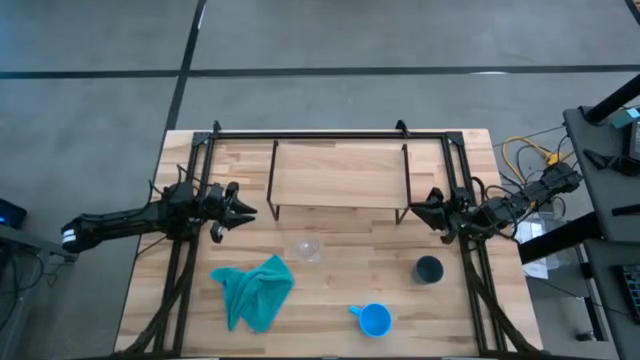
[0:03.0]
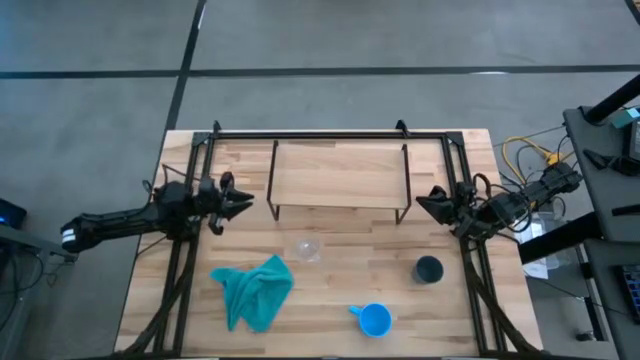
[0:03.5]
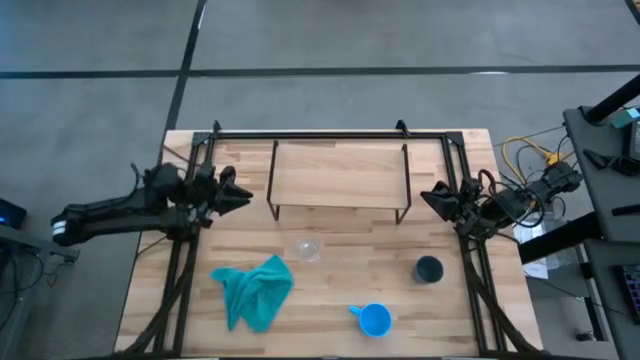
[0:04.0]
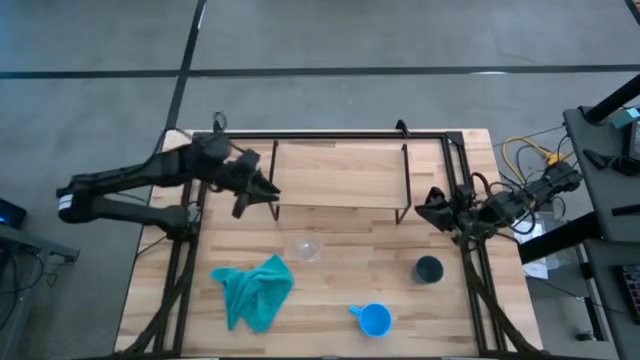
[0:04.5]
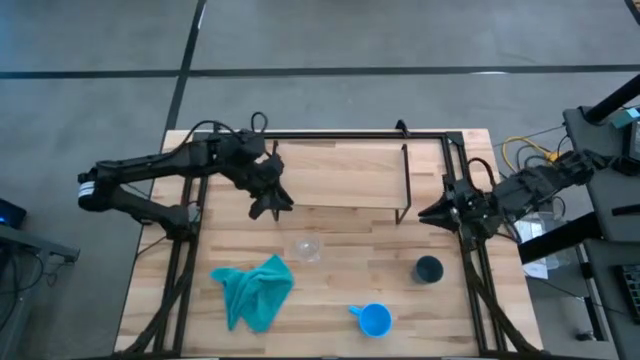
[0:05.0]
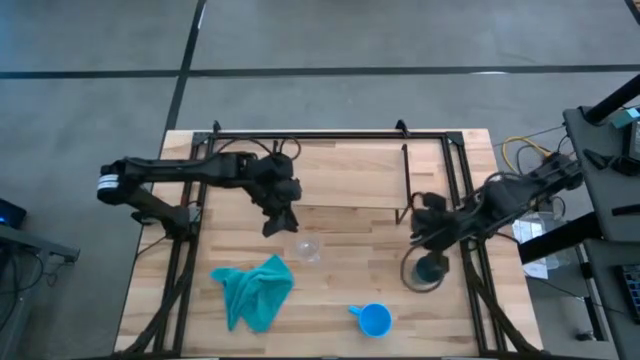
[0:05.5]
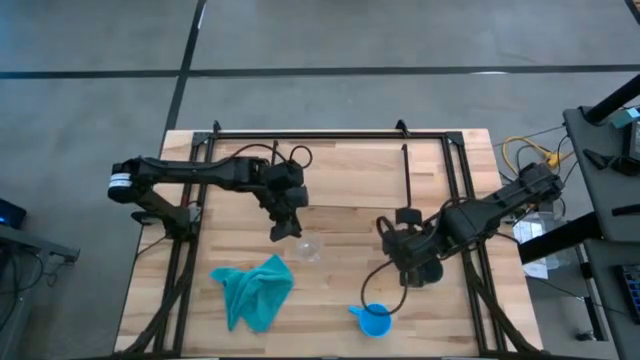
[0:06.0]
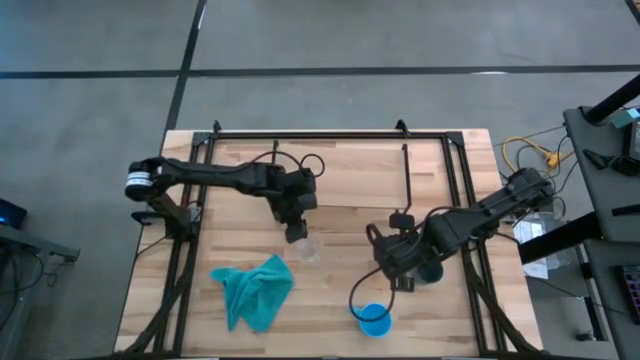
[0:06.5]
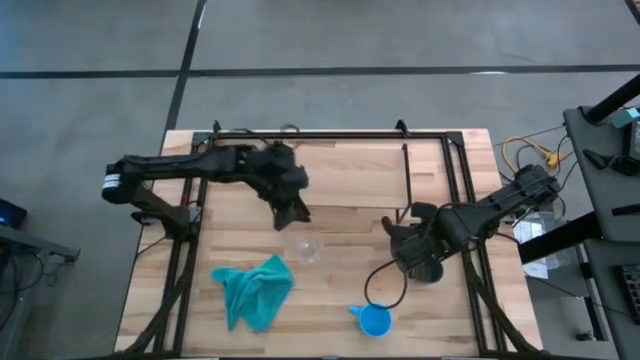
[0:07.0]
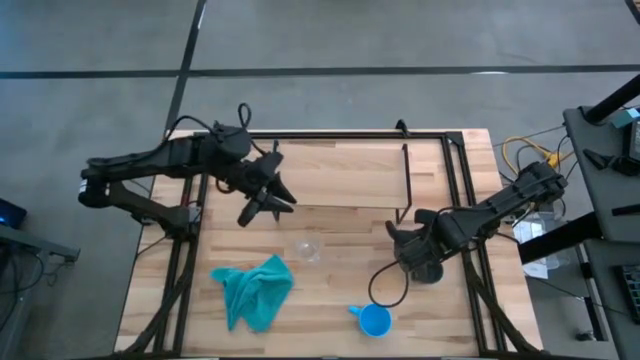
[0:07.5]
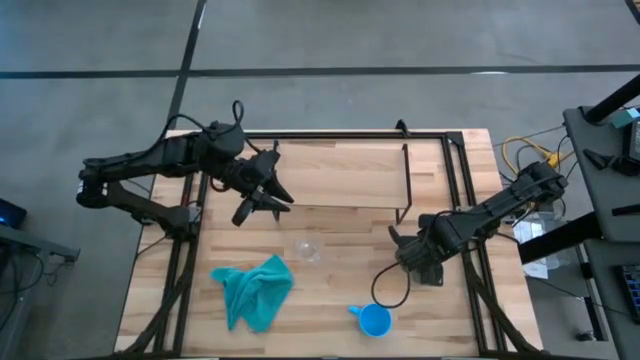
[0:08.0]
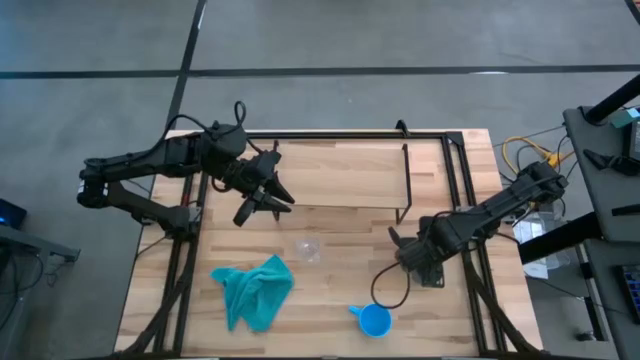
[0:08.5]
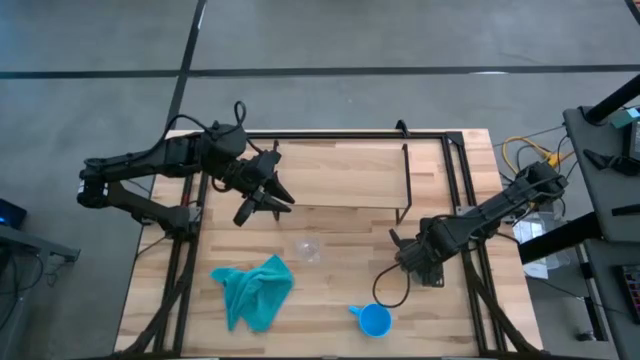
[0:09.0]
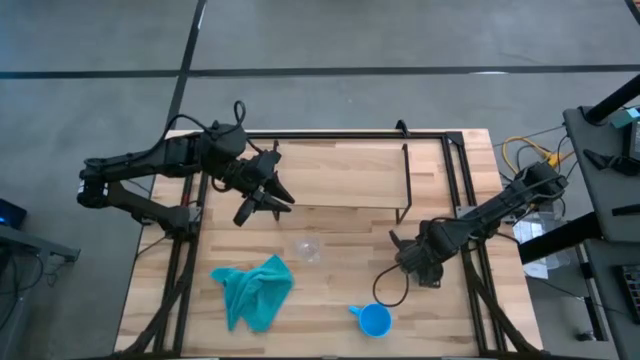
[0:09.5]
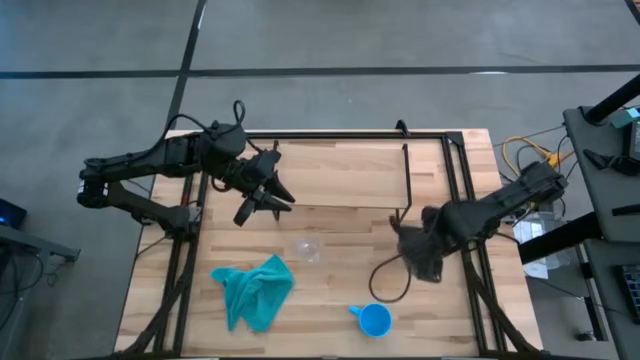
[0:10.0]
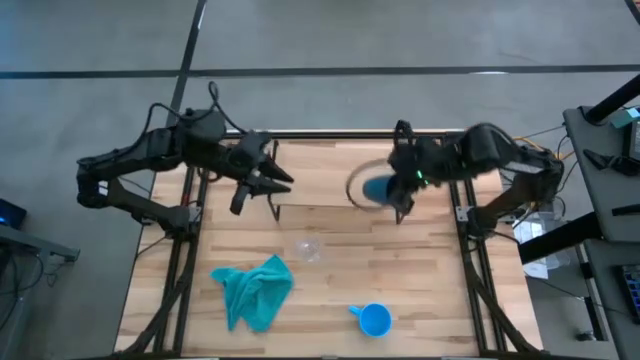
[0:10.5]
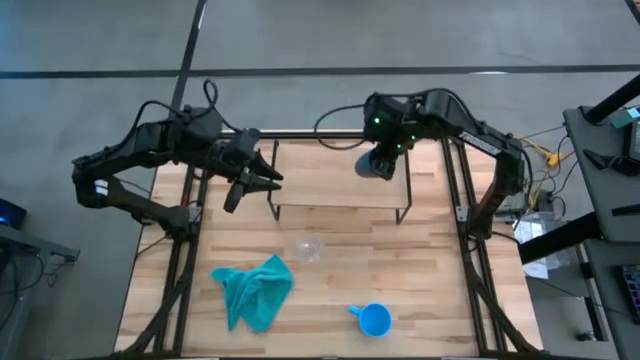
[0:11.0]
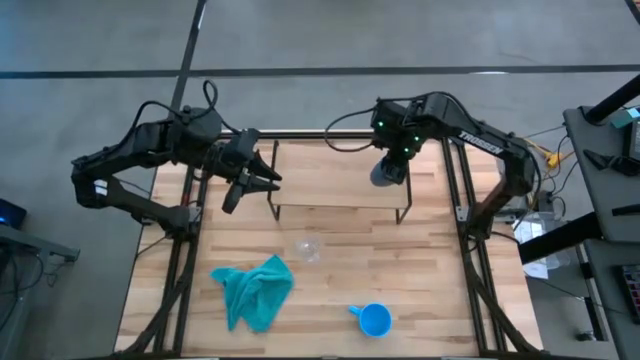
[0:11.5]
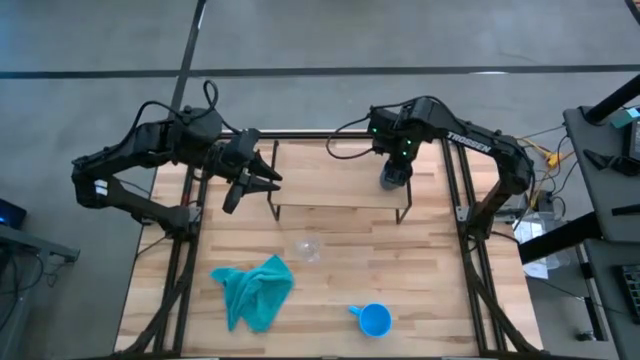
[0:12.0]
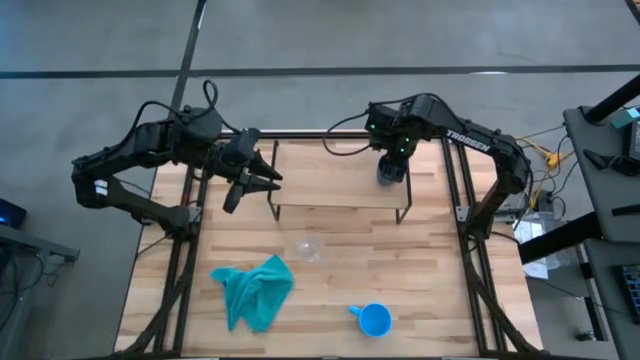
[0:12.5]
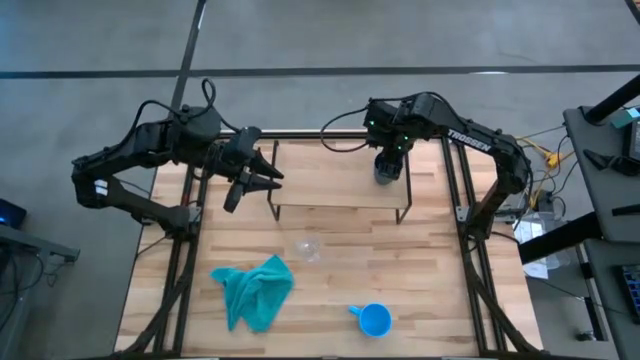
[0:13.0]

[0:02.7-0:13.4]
Task: Stack small to large cups/mugs on shelf
Put the dark blue mug on the shelf

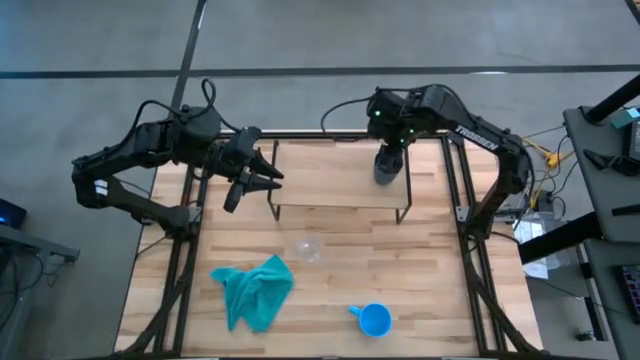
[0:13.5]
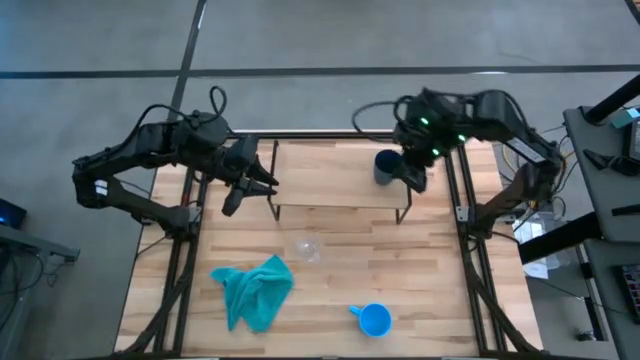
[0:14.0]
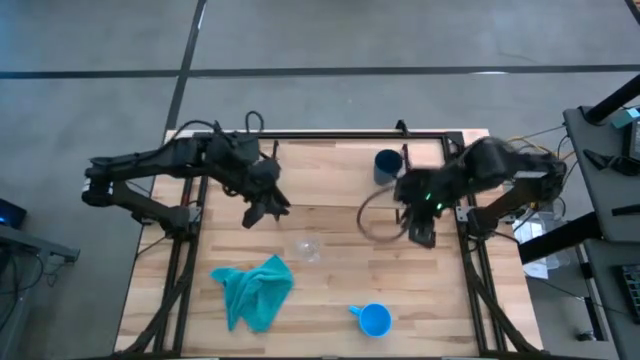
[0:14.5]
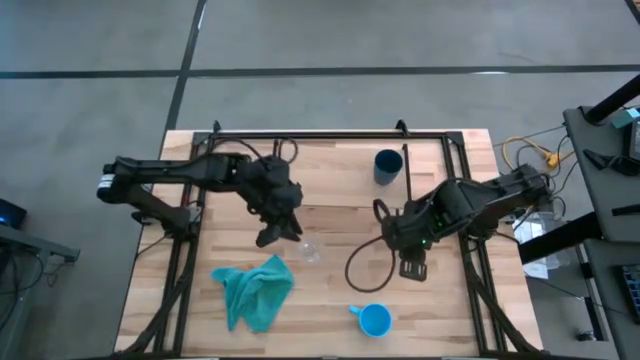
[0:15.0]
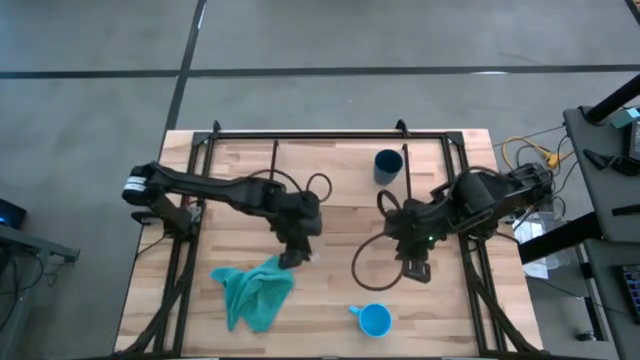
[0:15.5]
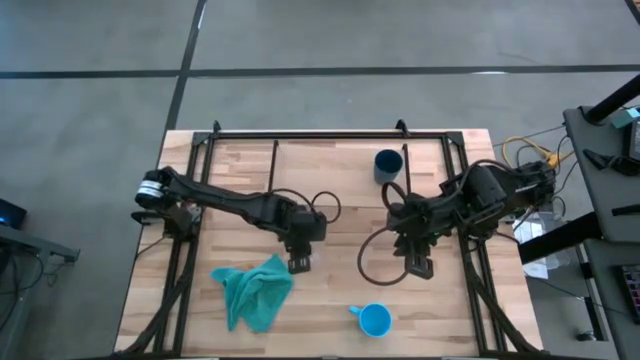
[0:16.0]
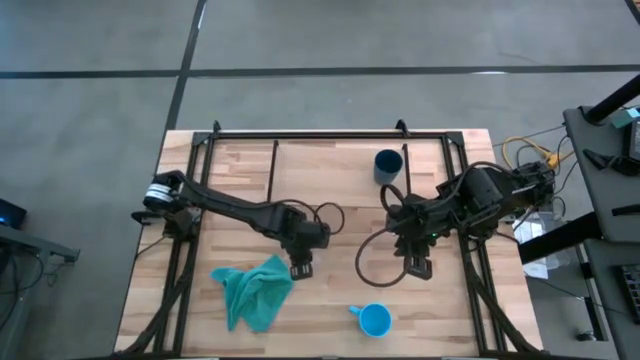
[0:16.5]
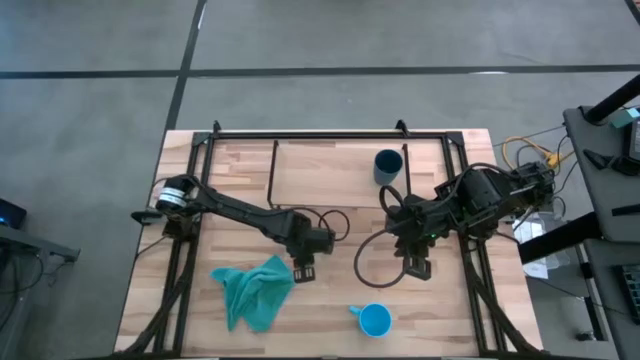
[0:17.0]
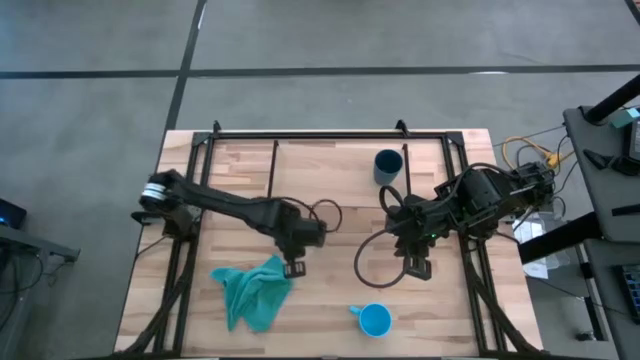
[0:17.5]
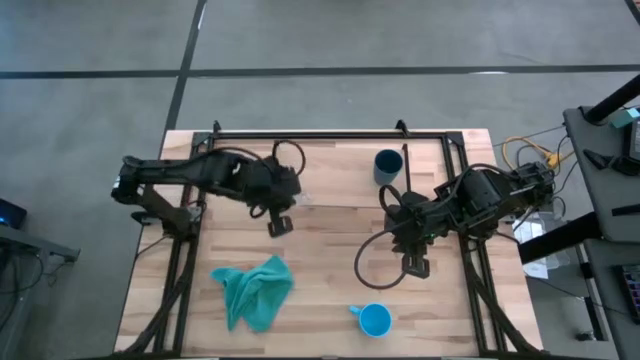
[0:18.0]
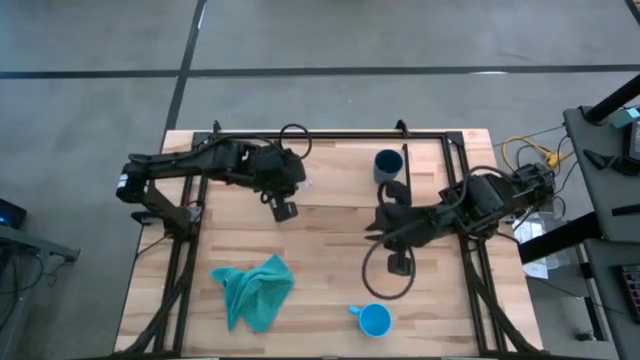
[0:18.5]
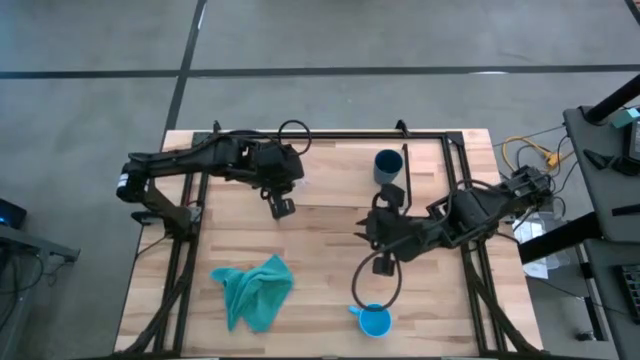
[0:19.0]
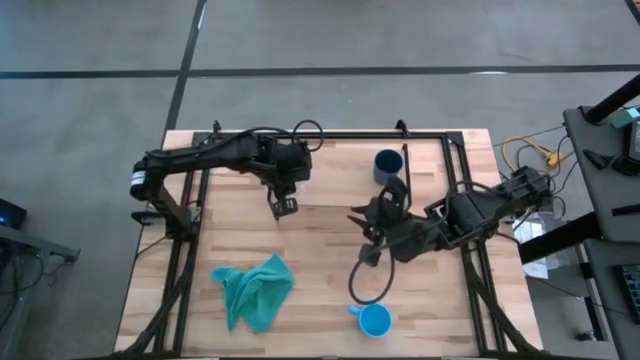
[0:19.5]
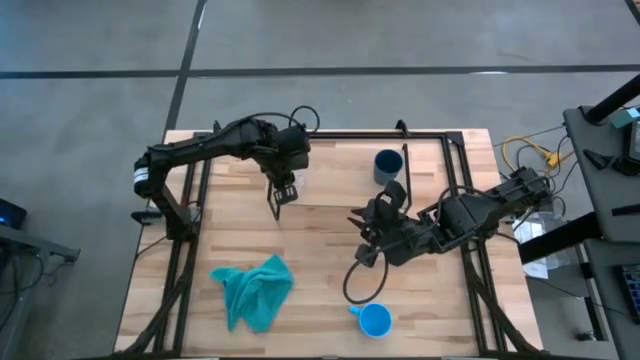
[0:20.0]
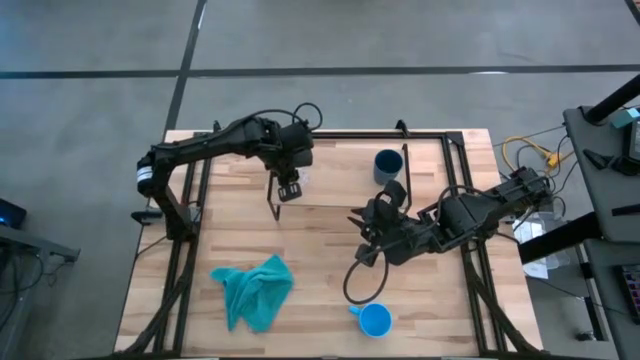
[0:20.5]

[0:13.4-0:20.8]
Put the transparent mug on the shelf

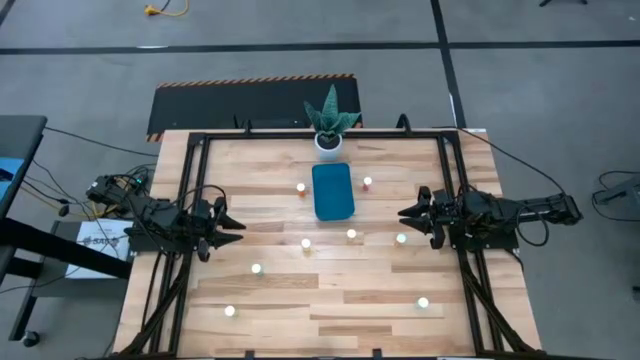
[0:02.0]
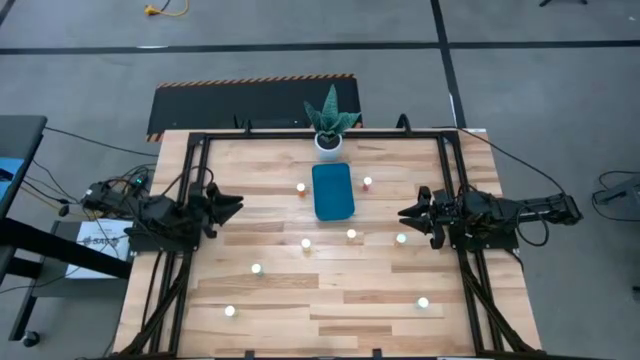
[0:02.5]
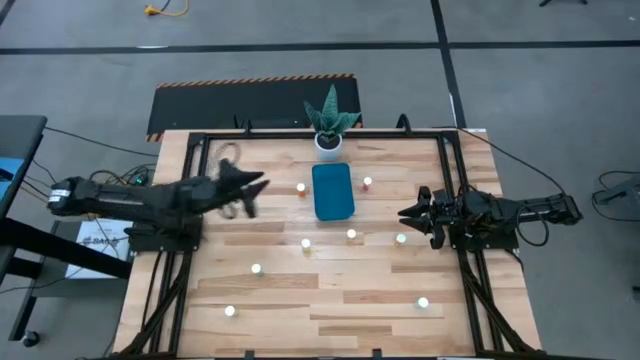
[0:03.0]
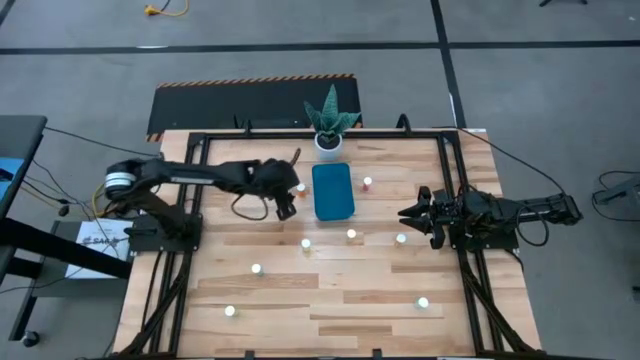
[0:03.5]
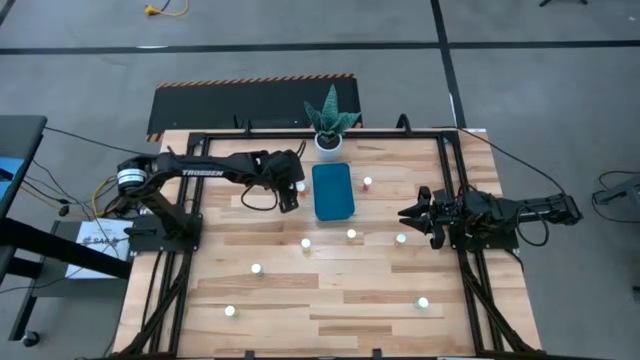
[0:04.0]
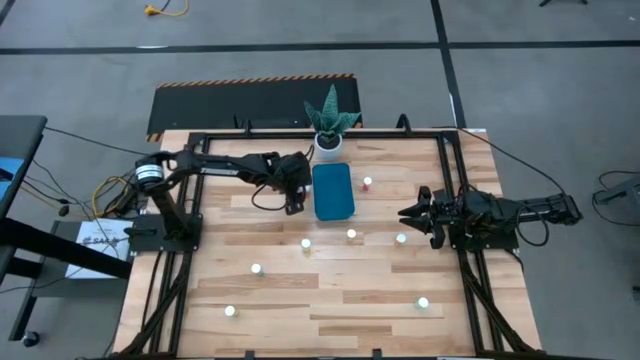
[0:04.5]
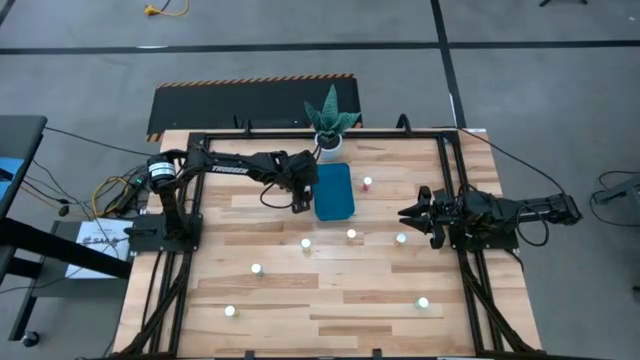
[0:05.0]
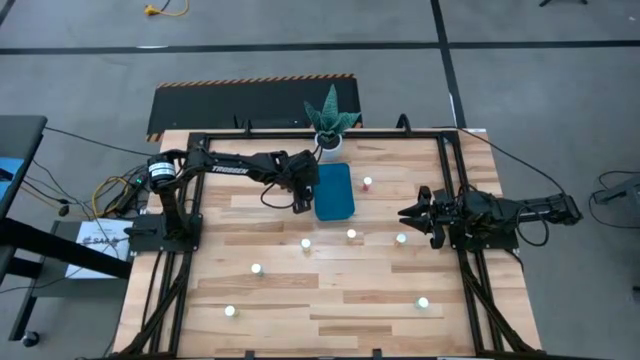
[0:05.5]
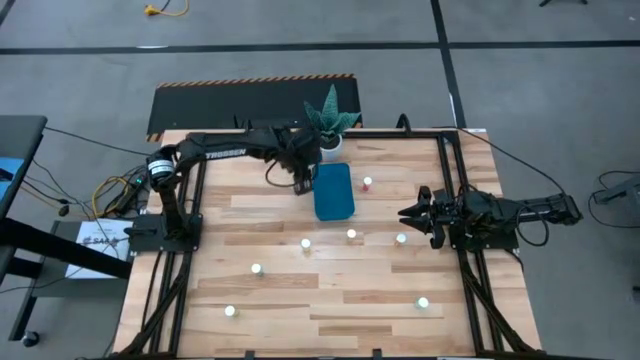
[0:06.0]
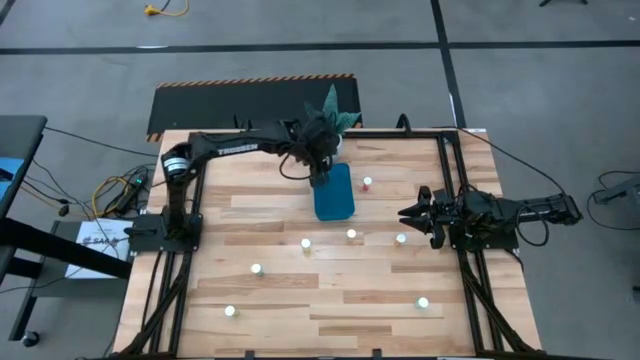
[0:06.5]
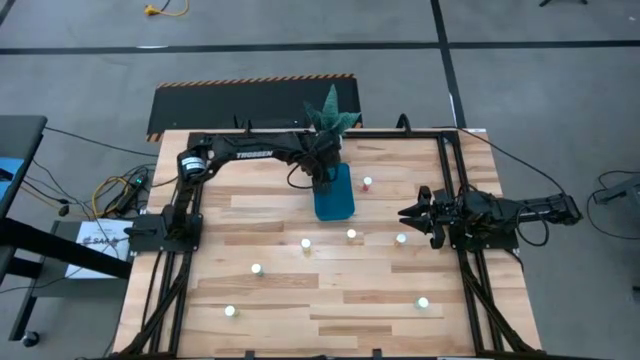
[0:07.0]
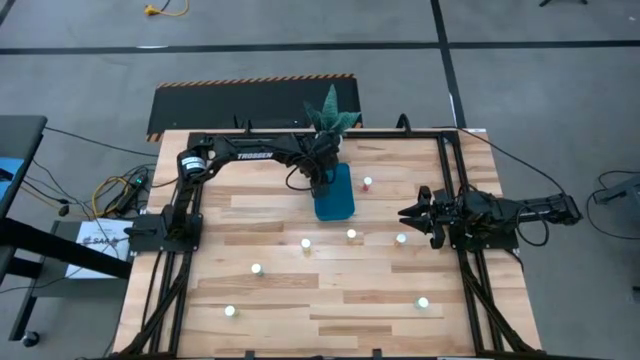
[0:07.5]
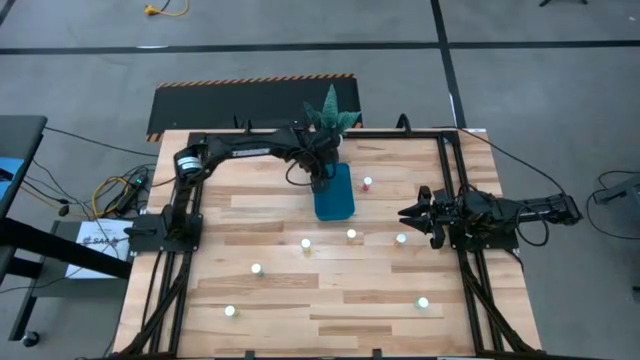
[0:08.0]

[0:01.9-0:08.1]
Task: Pick and place pill bottles into a basket
Put the orange pill bottle into the blue container
